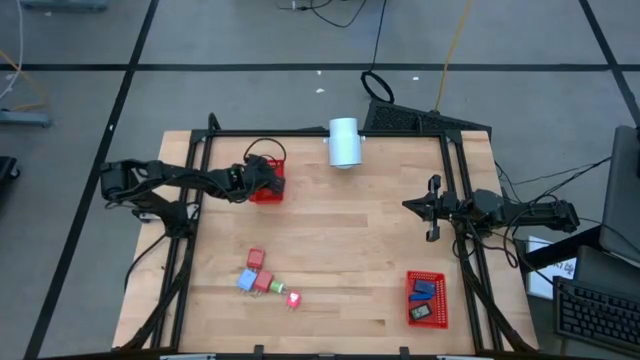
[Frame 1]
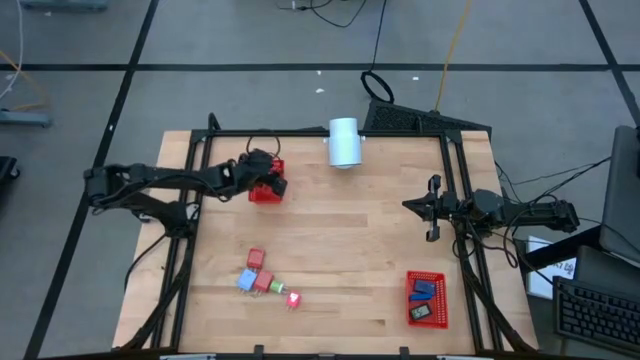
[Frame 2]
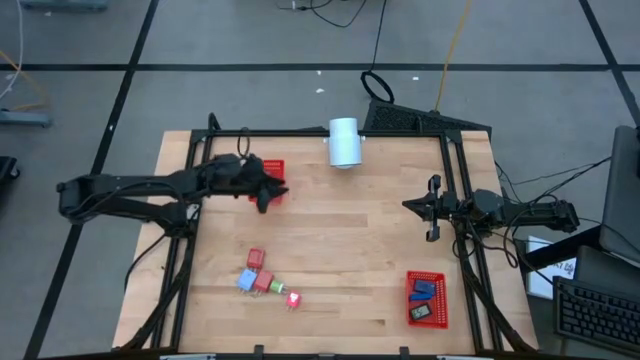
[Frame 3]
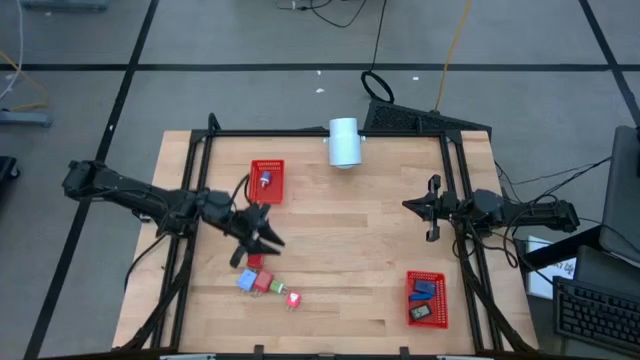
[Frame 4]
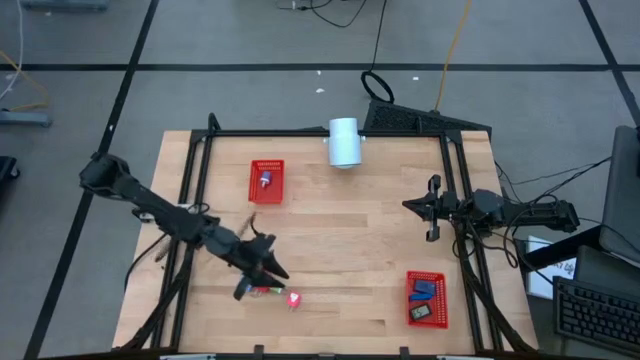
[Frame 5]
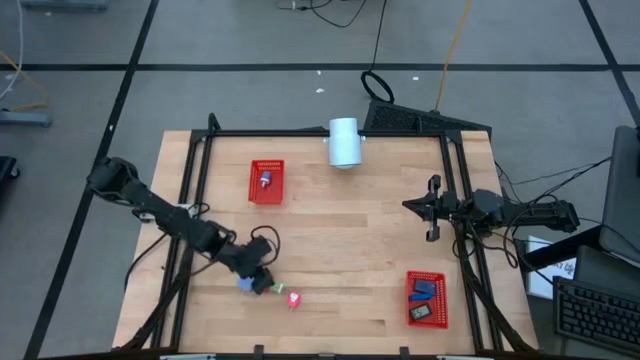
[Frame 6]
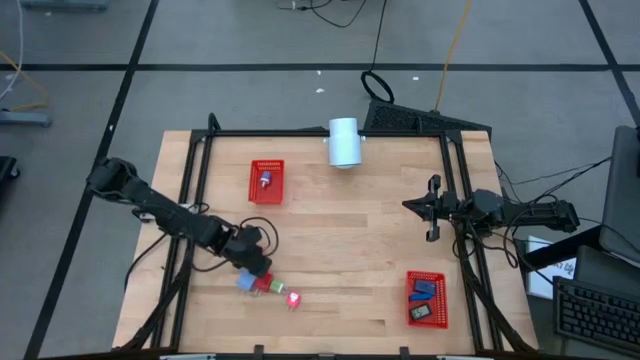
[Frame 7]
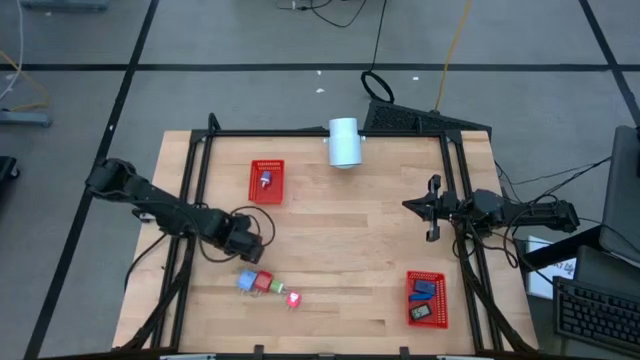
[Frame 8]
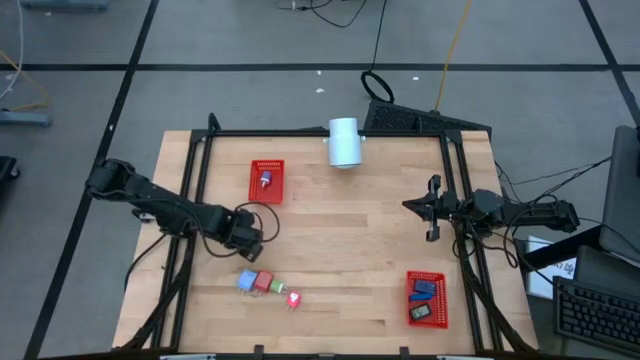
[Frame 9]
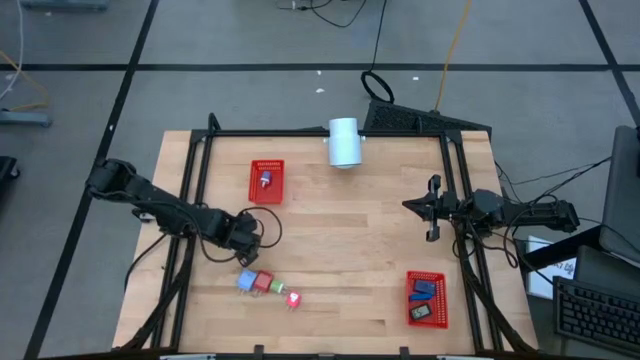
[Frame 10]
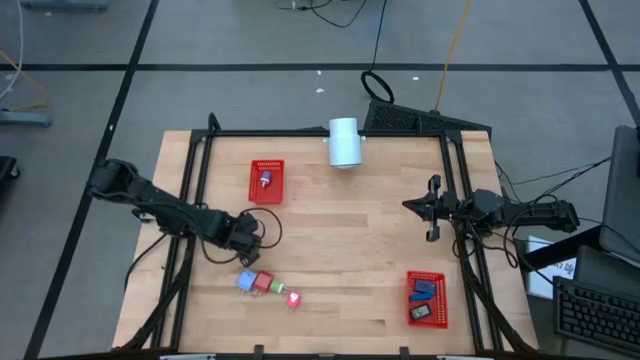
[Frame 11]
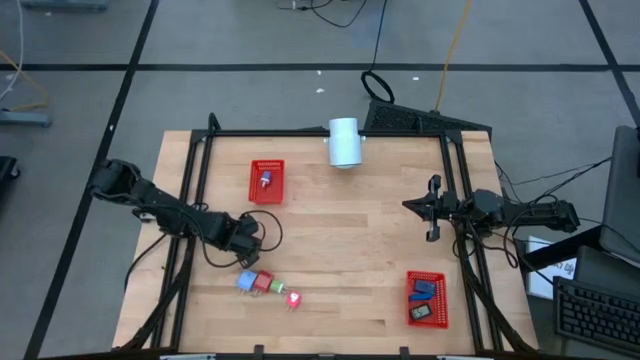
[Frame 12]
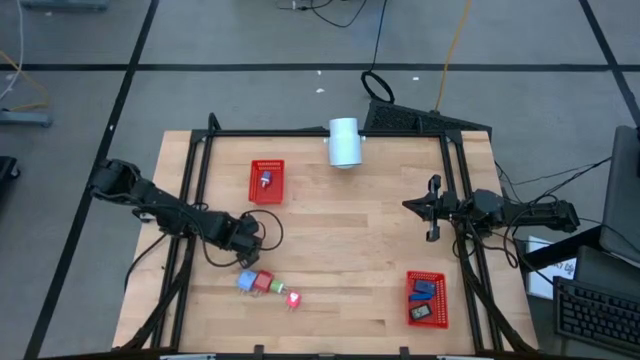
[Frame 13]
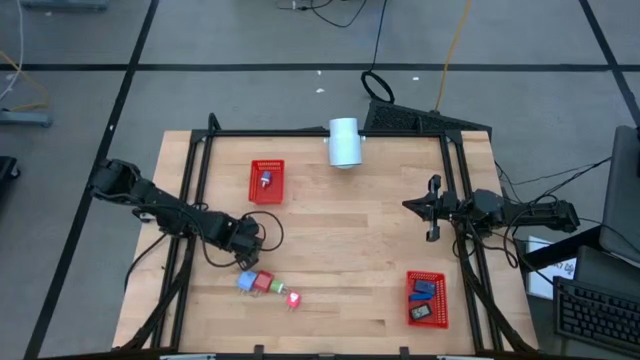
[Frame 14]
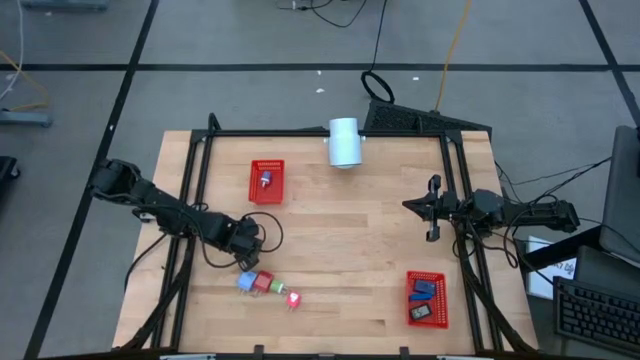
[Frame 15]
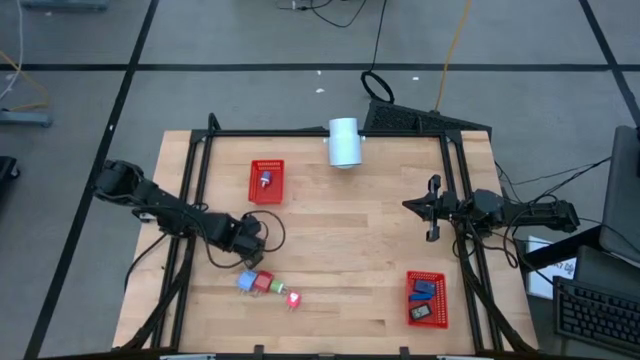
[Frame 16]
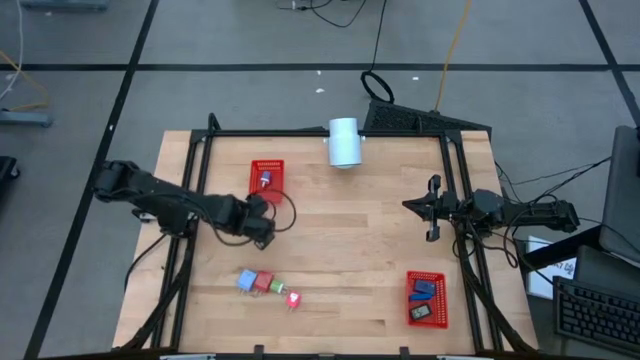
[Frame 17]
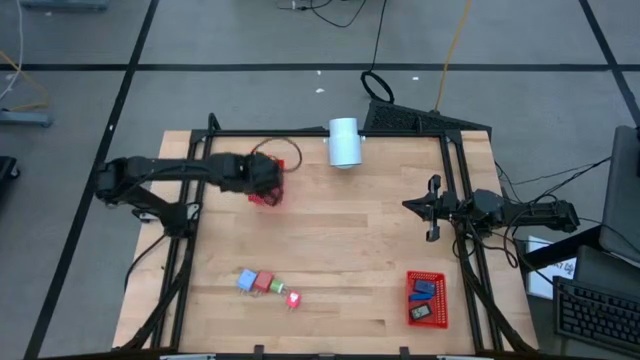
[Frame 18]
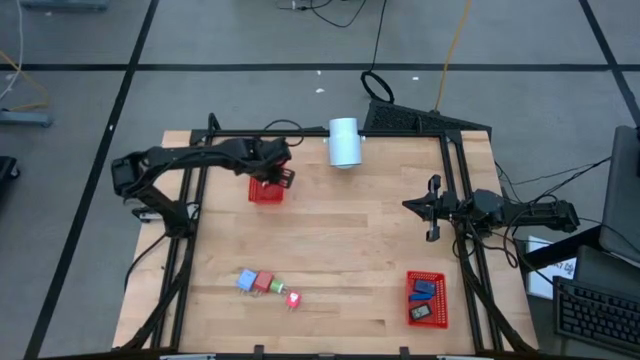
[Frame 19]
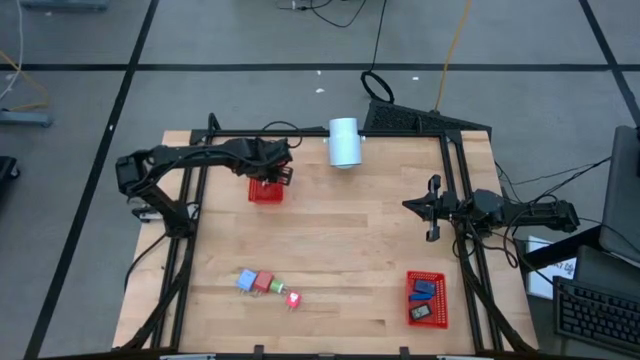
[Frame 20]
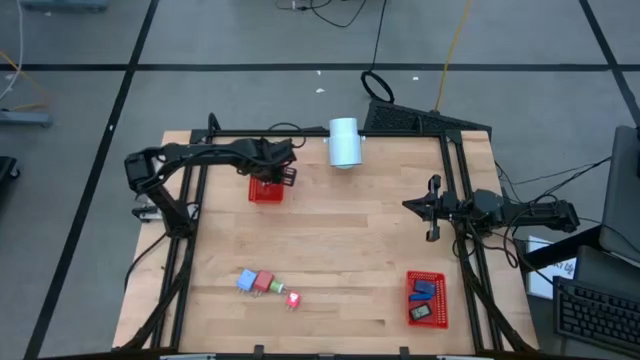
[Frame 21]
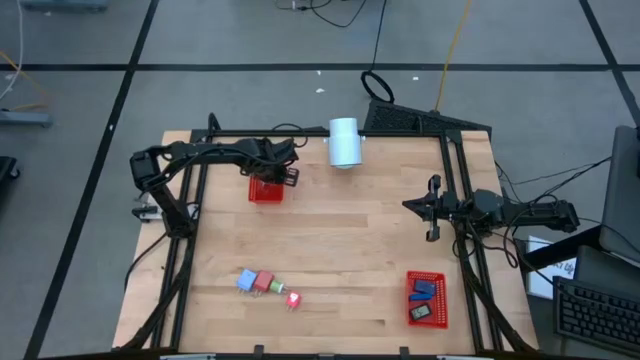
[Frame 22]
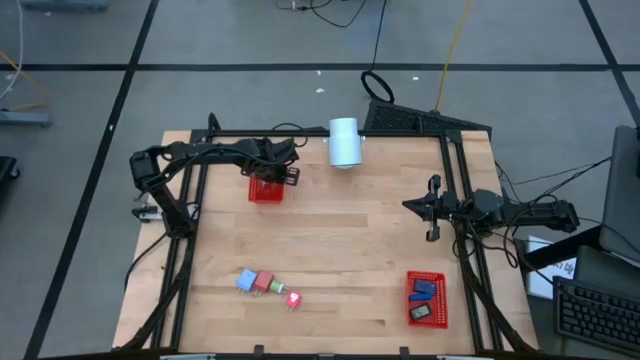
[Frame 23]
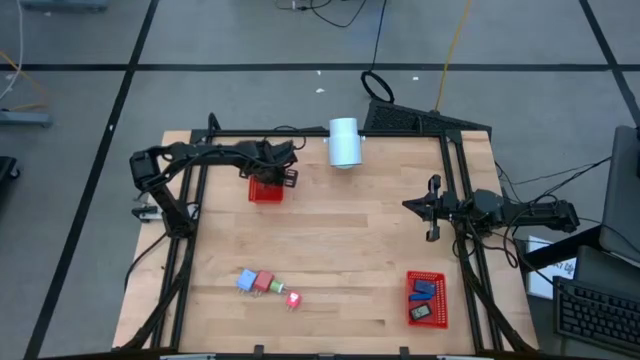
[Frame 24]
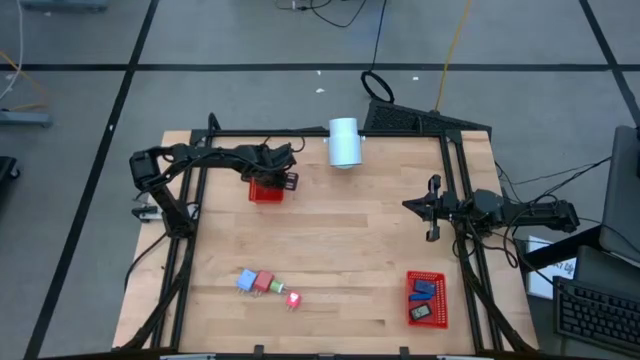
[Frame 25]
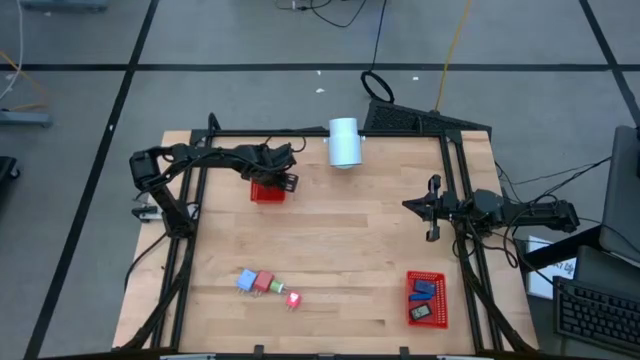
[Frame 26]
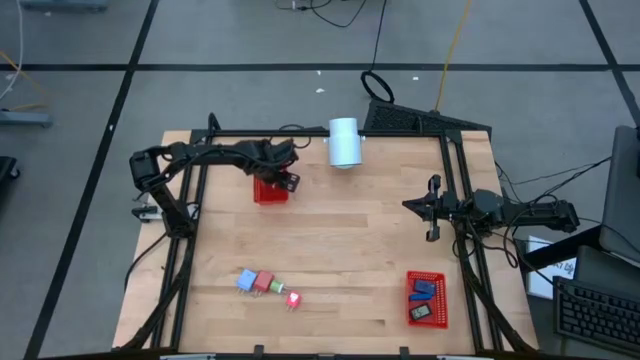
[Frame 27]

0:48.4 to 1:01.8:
Task: Pick & Place Office items
Put the top red charger adapter into the top red bin

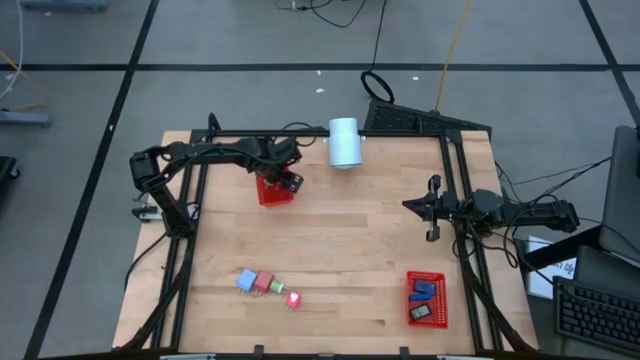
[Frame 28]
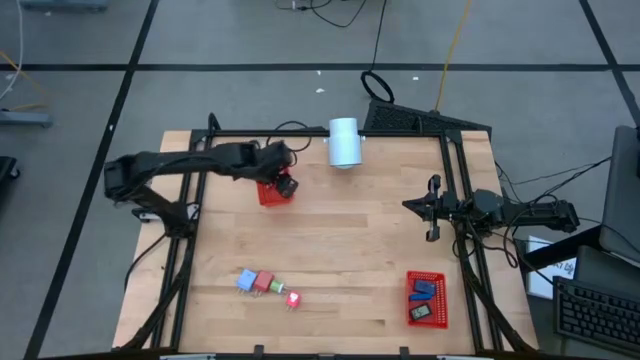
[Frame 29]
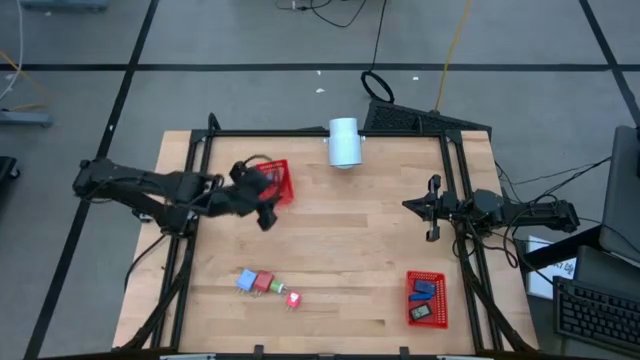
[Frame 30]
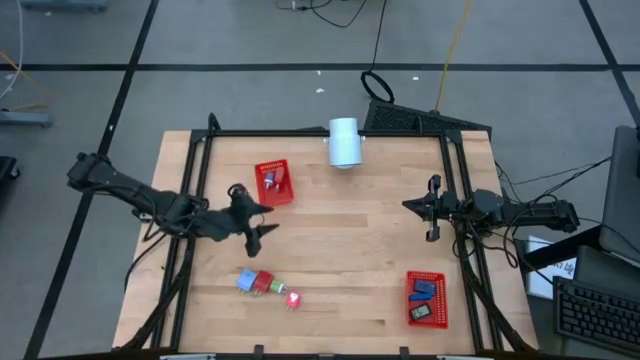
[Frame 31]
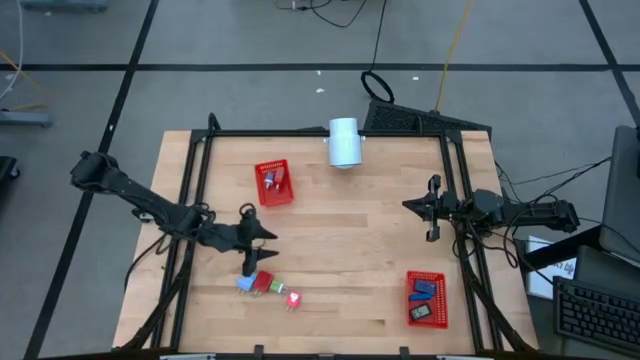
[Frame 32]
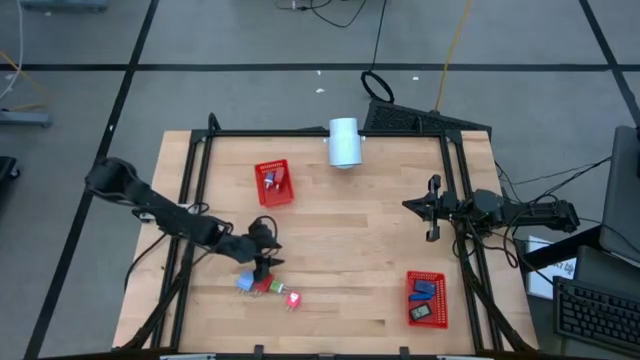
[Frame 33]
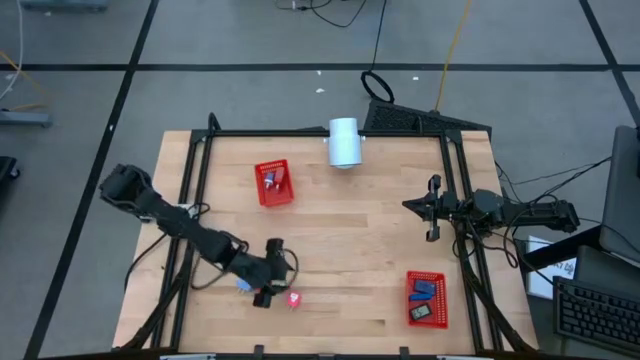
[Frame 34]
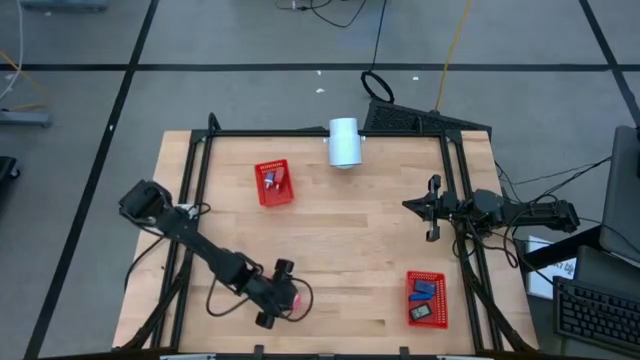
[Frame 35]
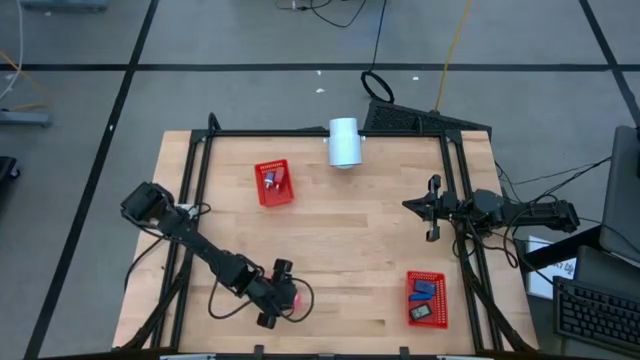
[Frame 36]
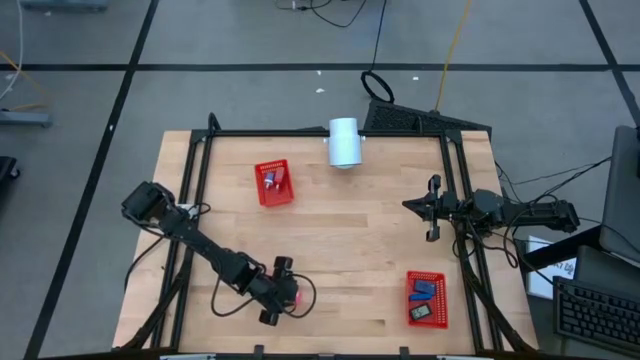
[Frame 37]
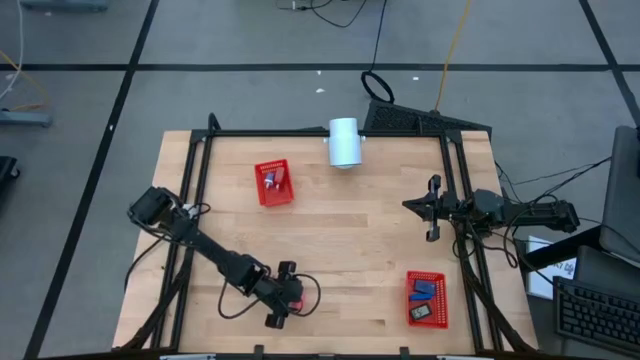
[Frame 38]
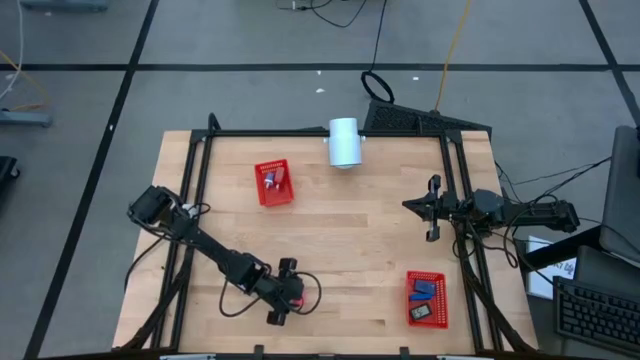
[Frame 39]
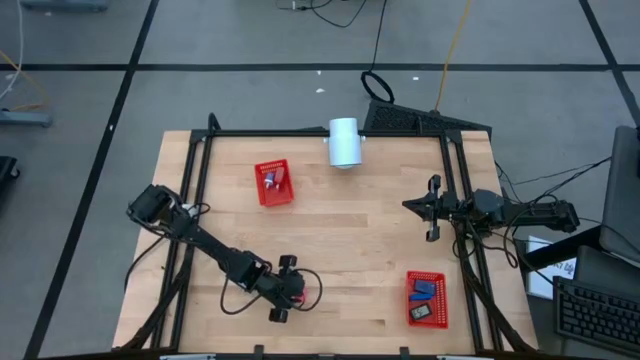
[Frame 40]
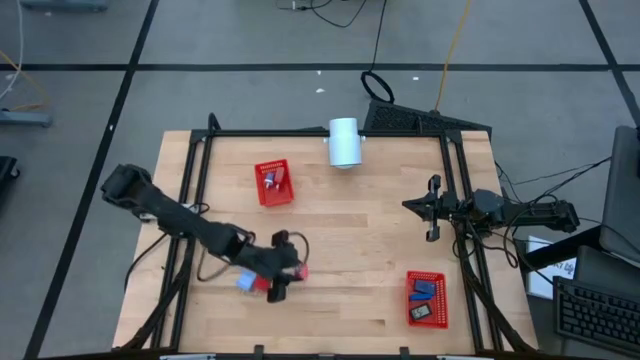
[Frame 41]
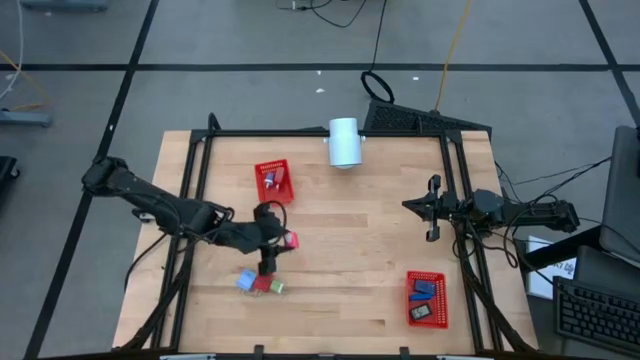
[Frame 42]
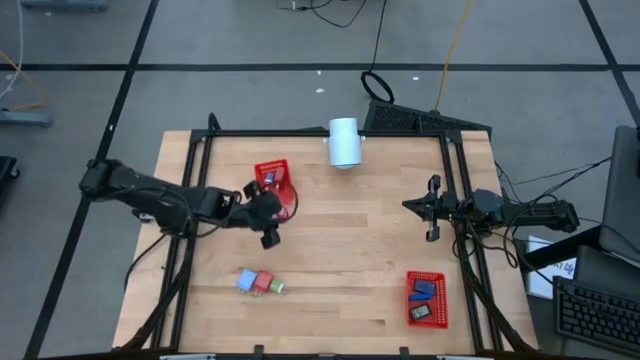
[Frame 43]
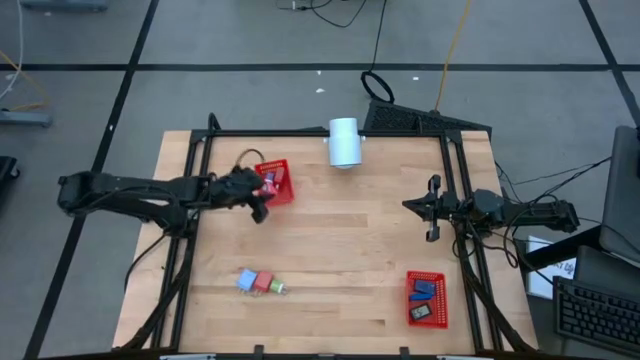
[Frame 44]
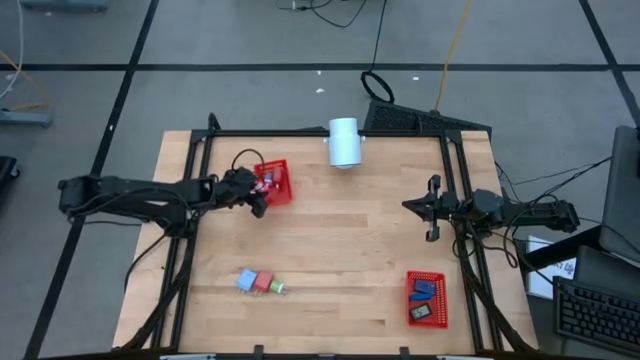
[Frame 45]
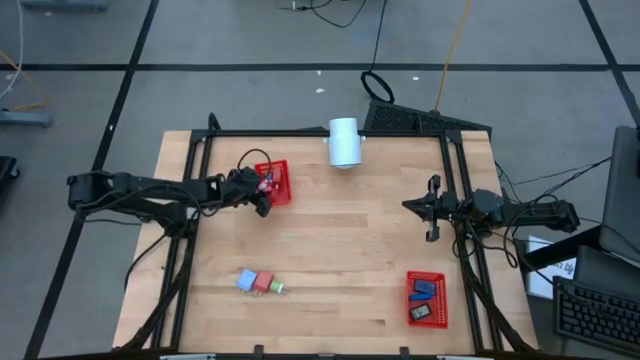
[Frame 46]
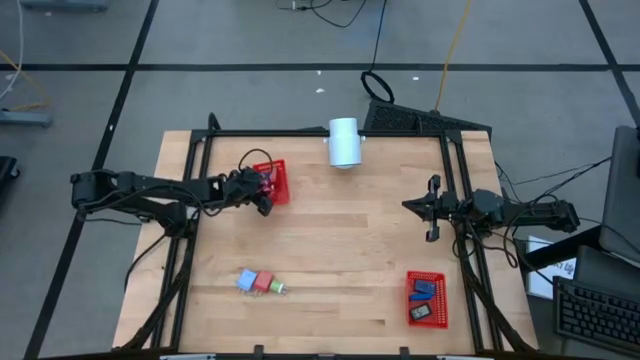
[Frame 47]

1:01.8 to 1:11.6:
Put the pink charger adapter into the top red bin
